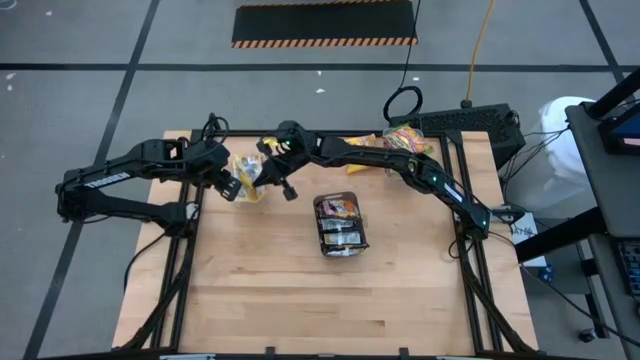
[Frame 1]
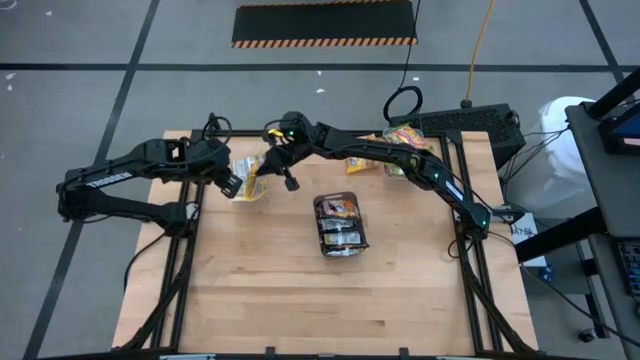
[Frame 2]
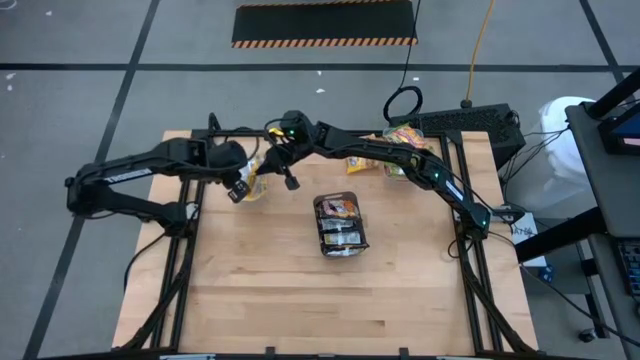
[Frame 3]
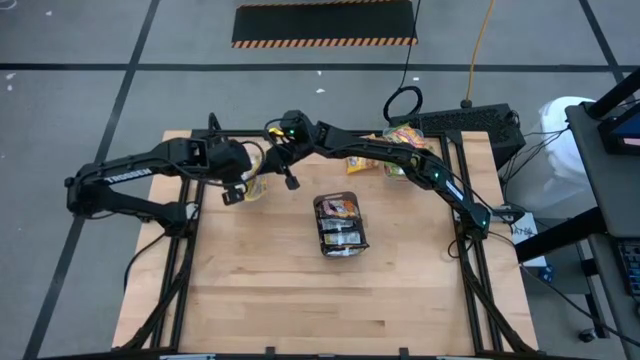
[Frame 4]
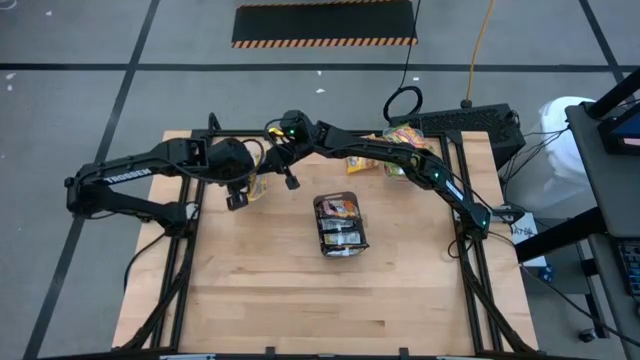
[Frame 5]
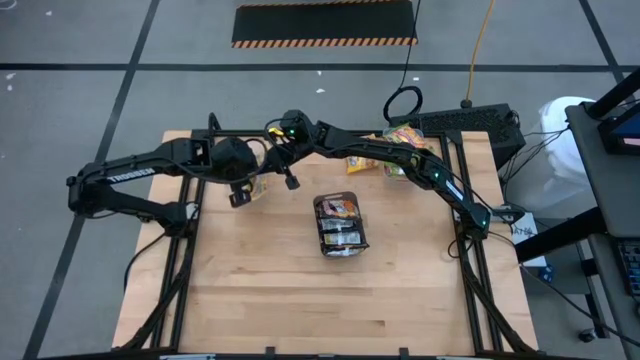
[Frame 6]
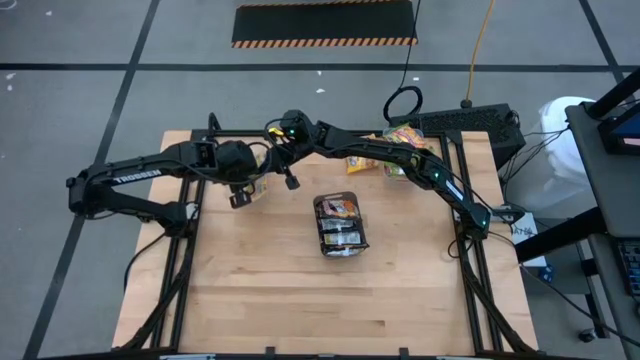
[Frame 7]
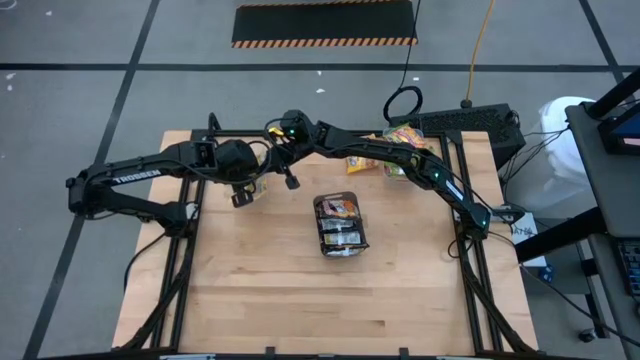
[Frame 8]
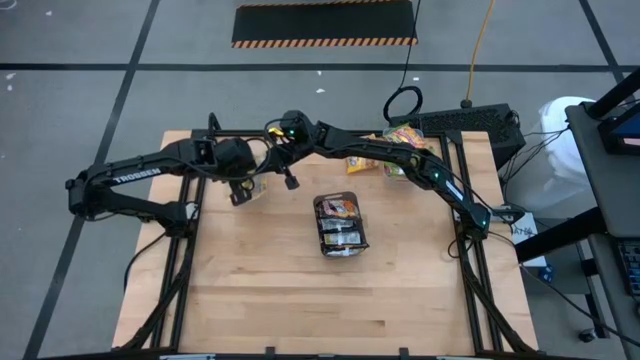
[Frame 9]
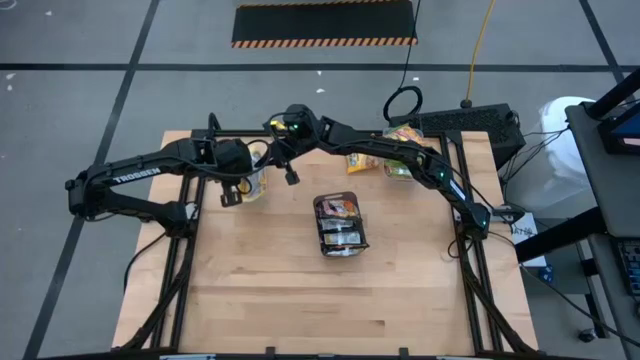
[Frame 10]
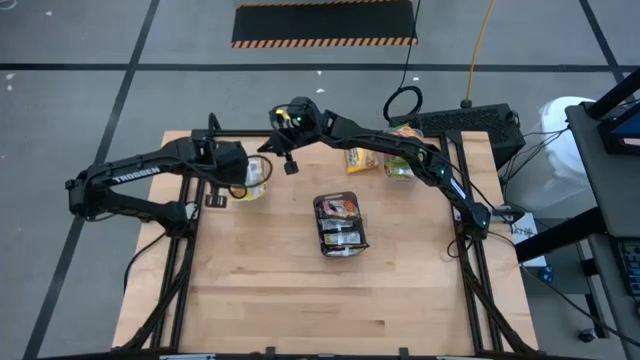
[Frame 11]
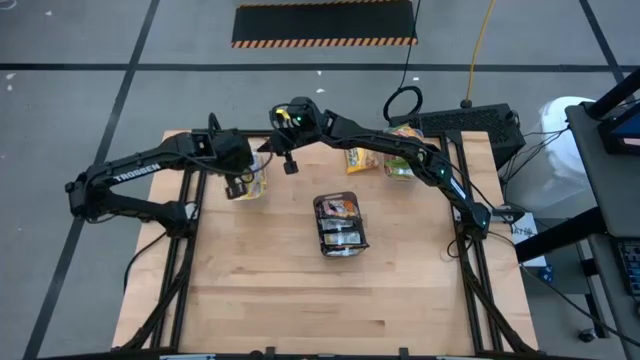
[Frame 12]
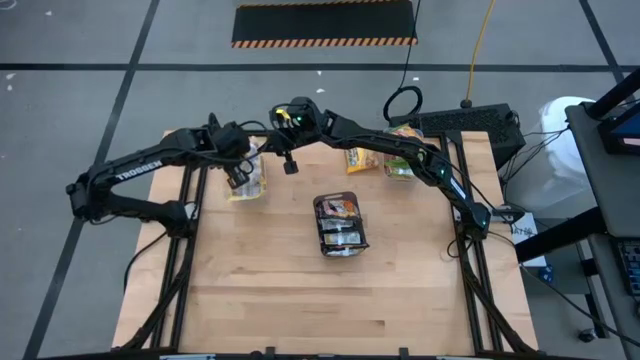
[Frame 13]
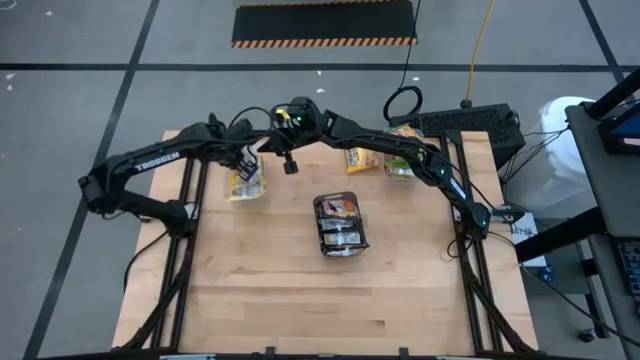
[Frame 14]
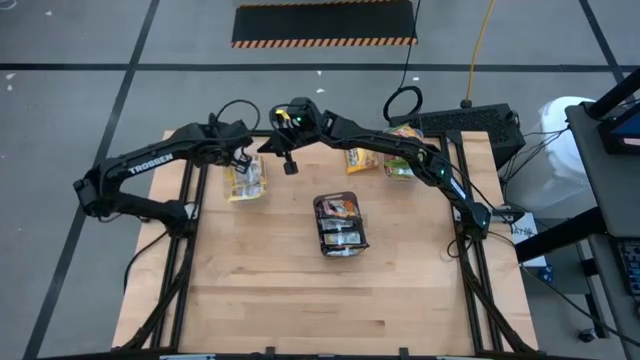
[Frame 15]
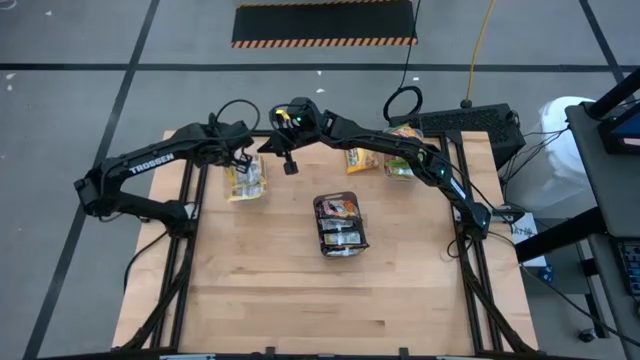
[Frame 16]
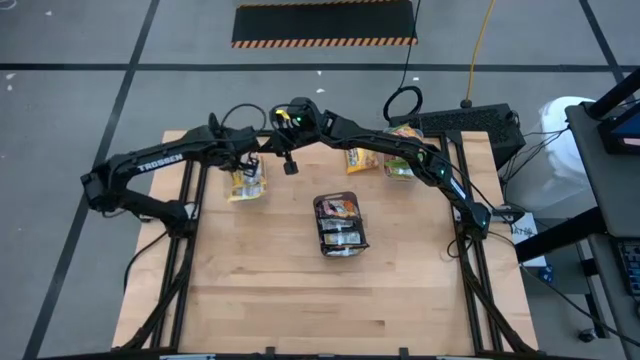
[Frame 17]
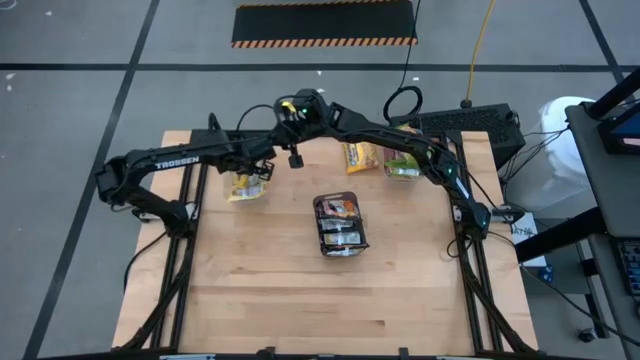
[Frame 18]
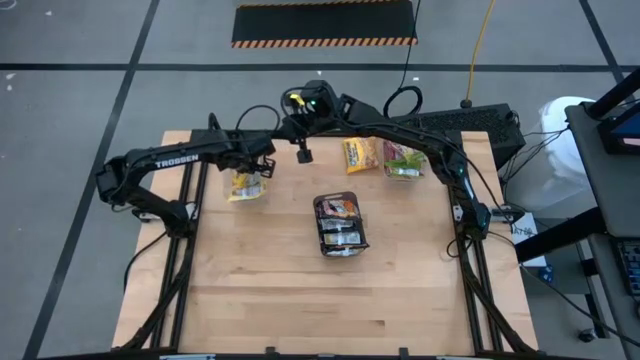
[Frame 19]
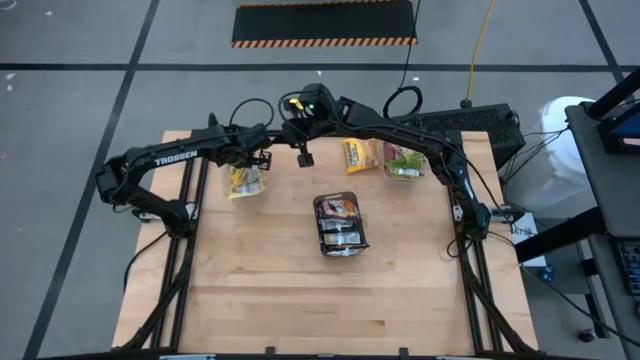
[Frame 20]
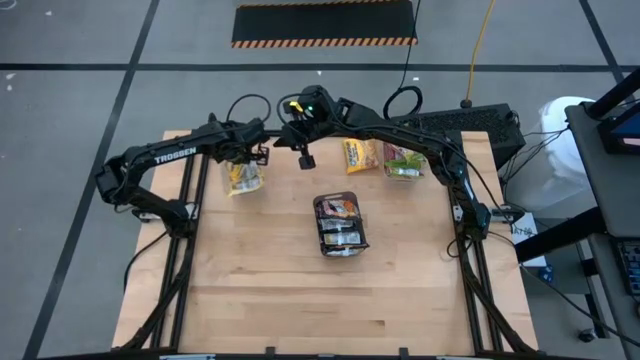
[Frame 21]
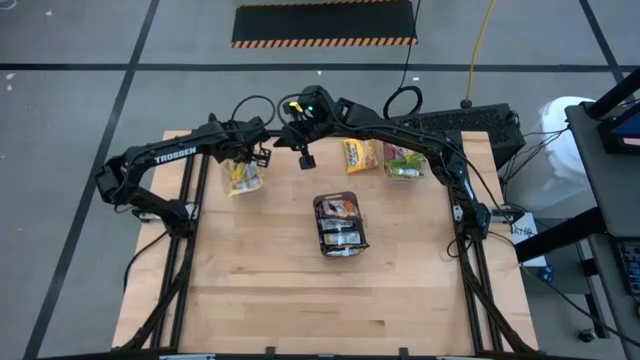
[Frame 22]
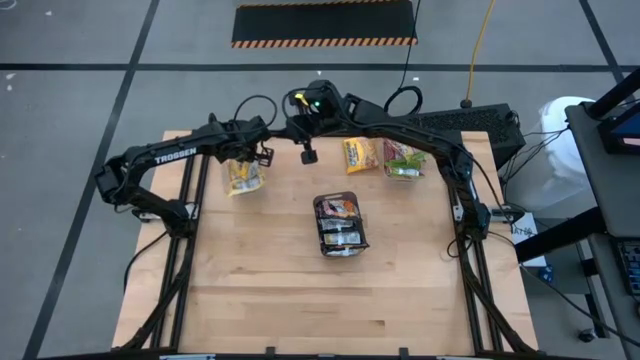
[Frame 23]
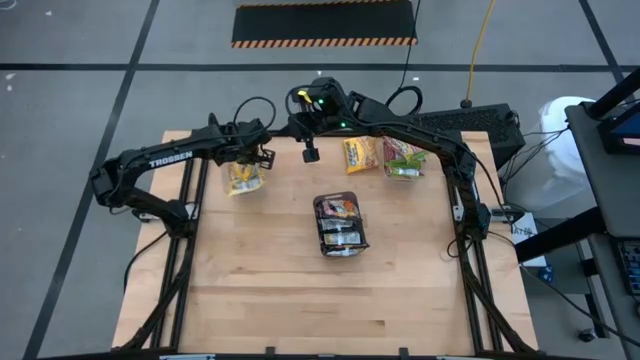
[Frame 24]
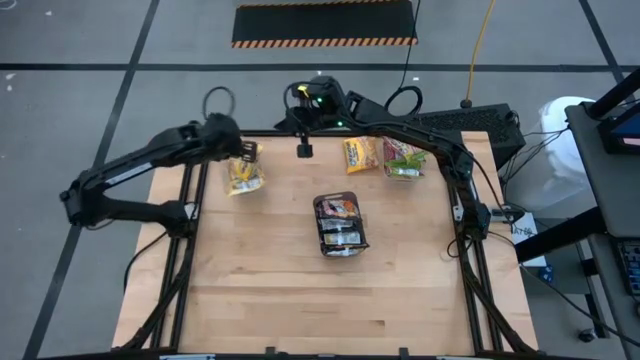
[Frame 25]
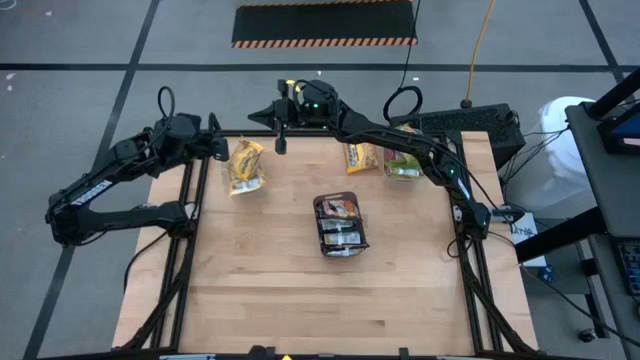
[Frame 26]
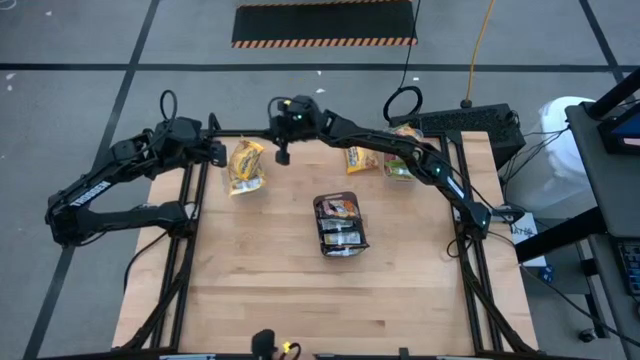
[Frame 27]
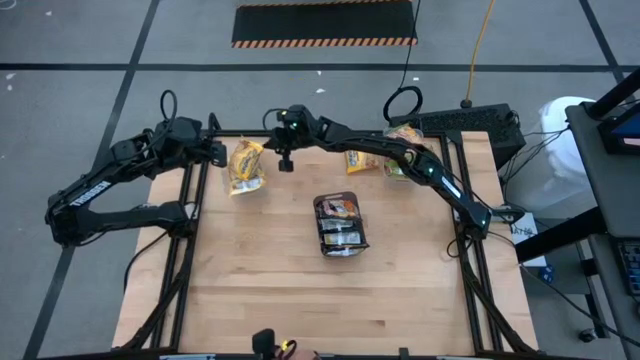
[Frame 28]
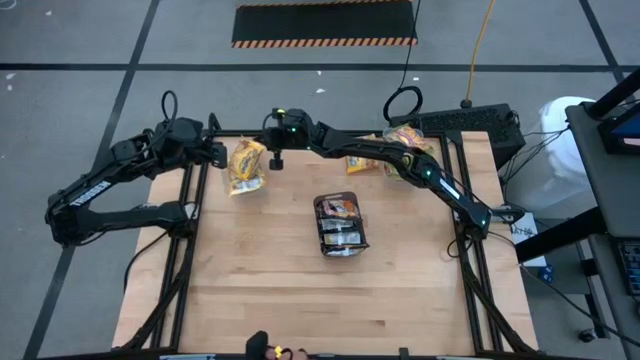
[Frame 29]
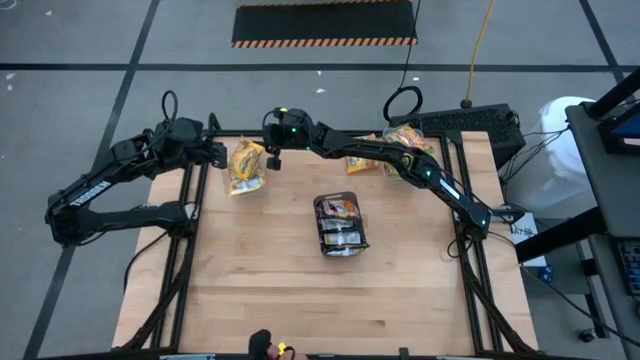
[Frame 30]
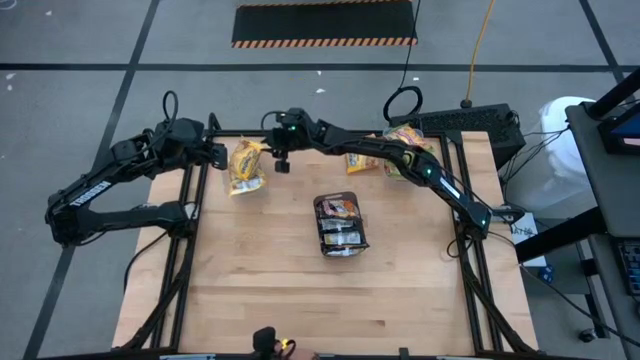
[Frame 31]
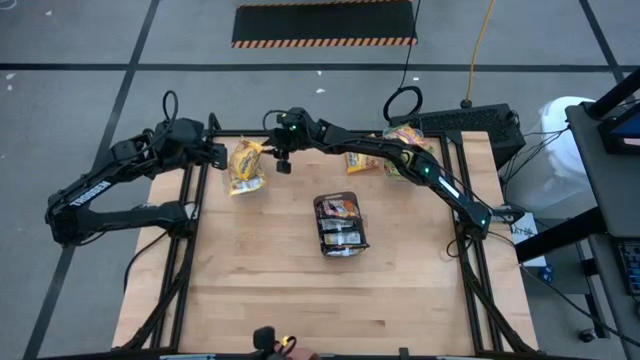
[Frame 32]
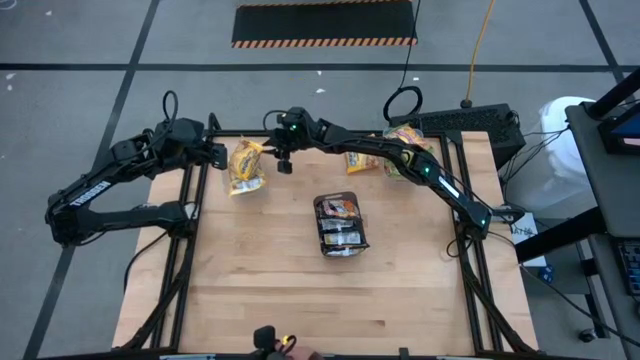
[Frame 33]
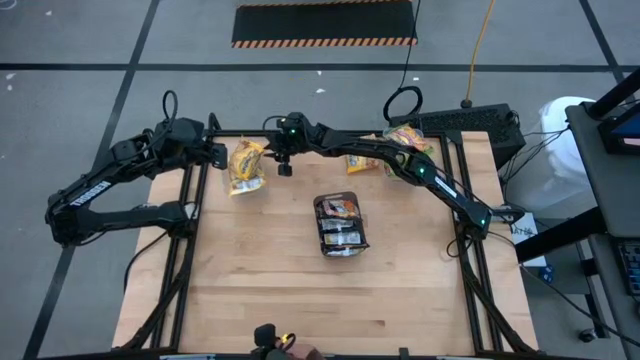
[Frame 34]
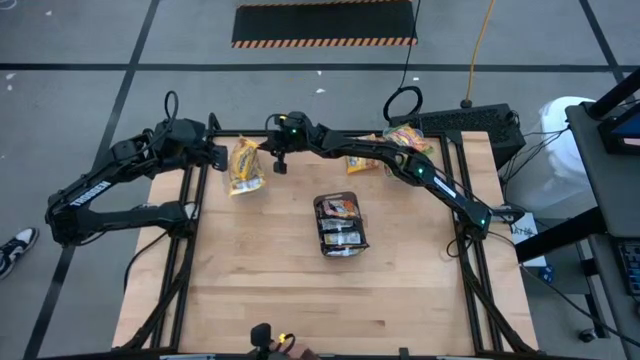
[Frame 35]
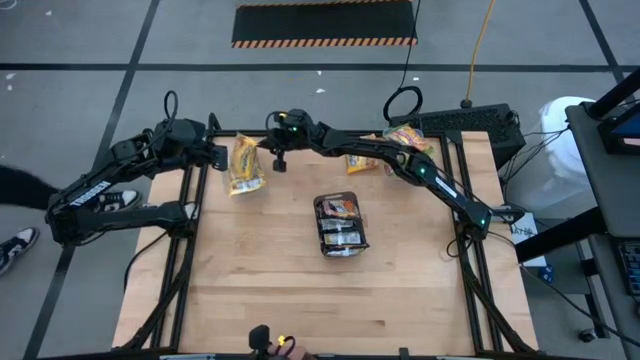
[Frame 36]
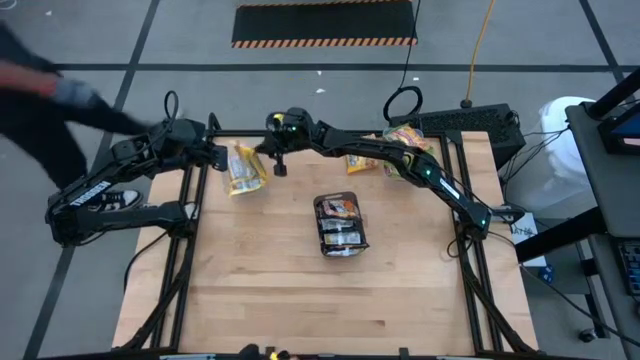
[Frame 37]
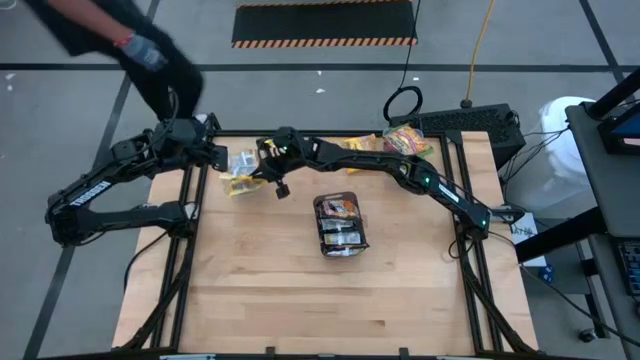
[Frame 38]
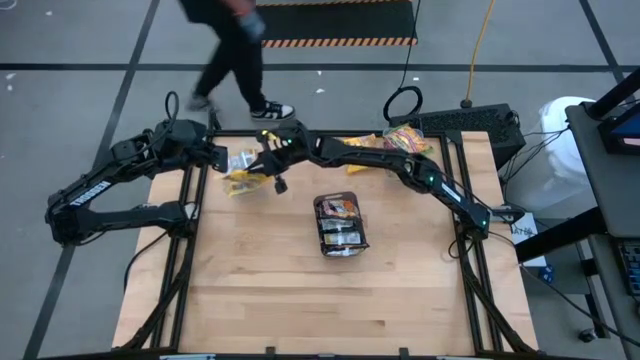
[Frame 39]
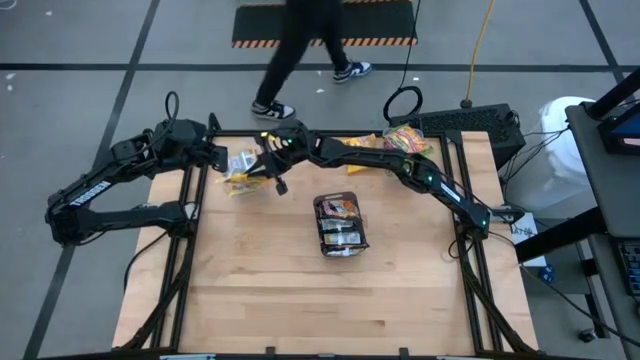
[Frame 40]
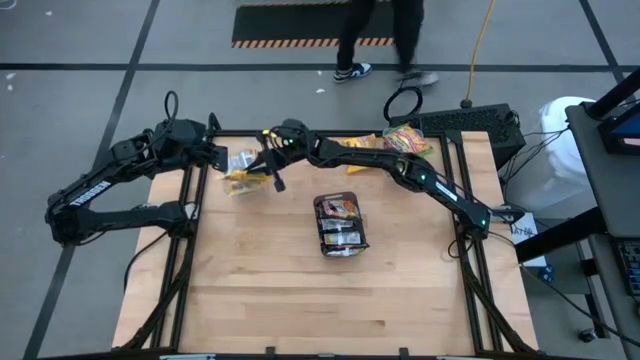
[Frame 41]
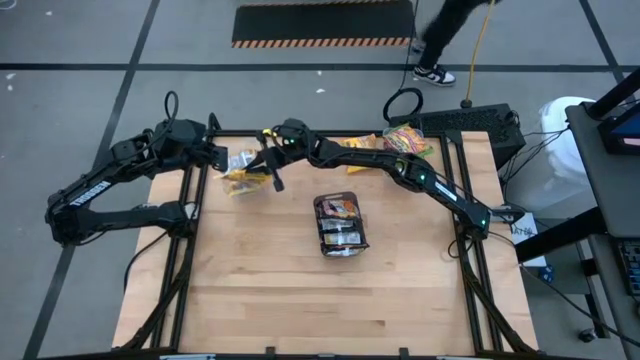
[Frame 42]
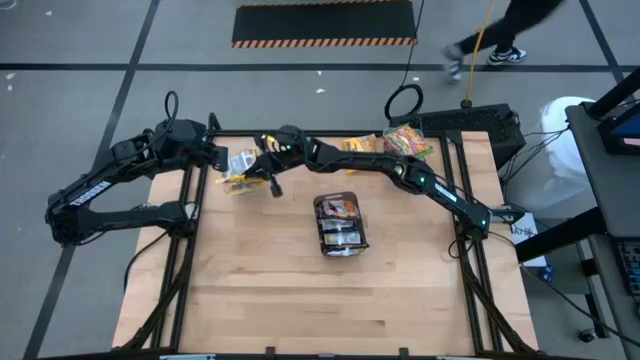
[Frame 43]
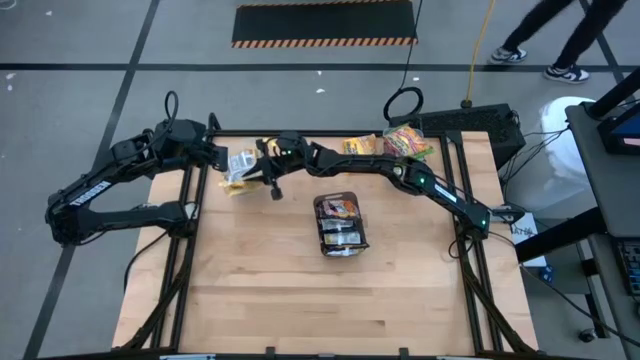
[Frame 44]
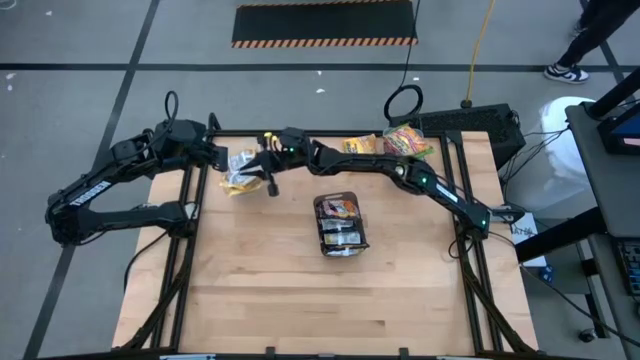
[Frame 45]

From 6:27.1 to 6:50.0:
Task: Sort Maruchan noodles
Put the bottom yellow noodle pack into the left transparent bin
